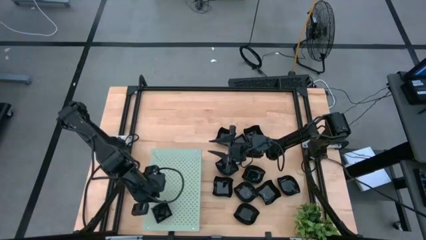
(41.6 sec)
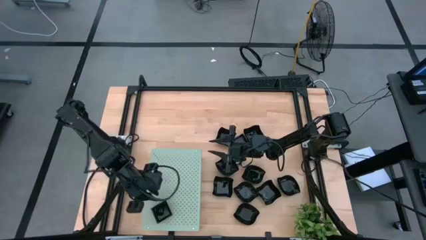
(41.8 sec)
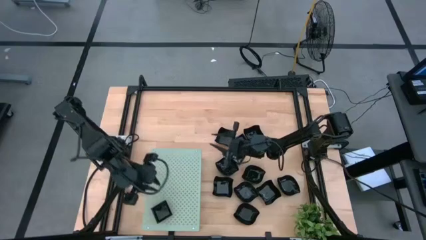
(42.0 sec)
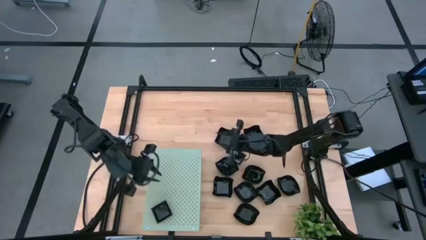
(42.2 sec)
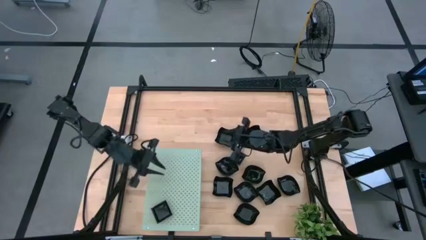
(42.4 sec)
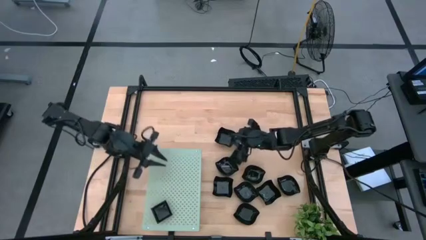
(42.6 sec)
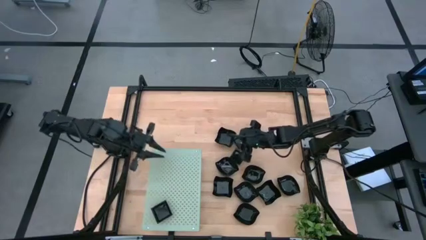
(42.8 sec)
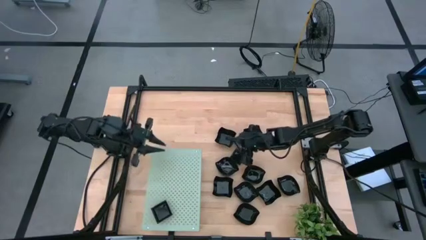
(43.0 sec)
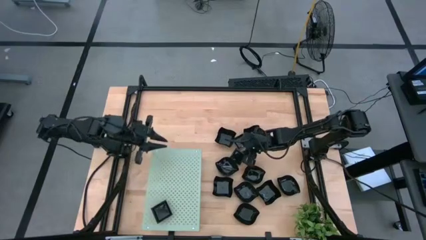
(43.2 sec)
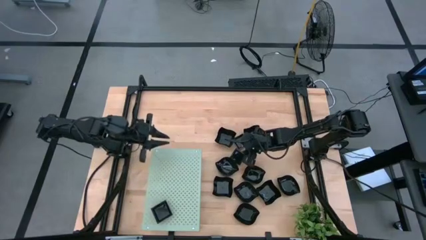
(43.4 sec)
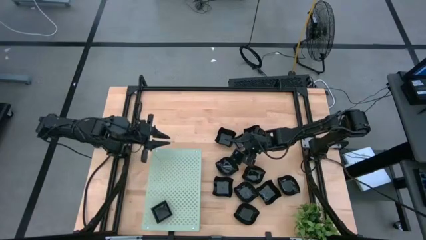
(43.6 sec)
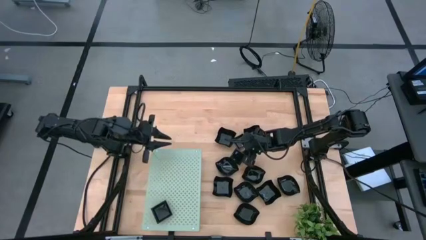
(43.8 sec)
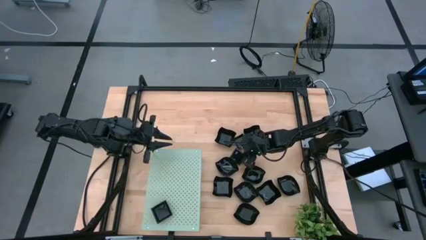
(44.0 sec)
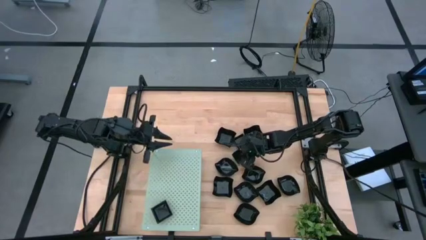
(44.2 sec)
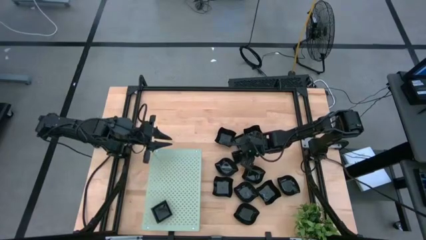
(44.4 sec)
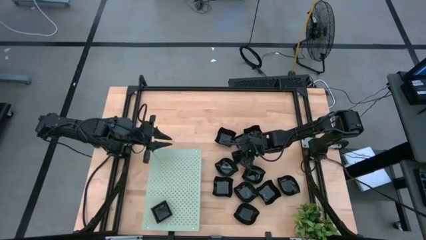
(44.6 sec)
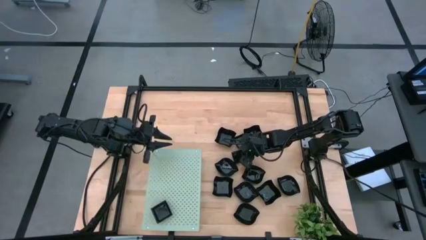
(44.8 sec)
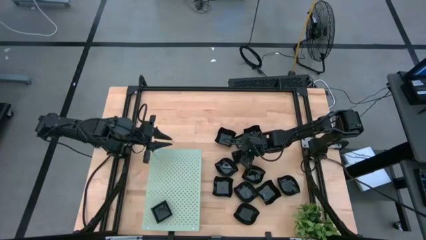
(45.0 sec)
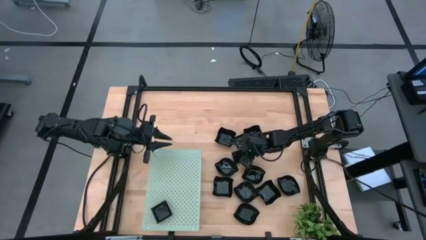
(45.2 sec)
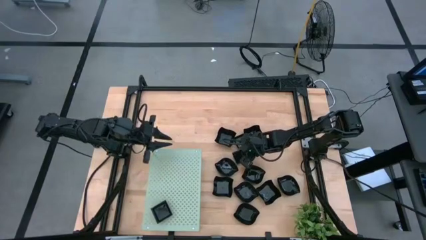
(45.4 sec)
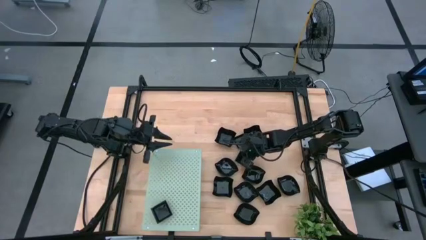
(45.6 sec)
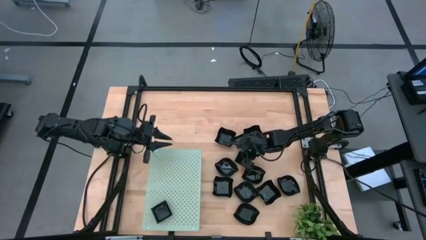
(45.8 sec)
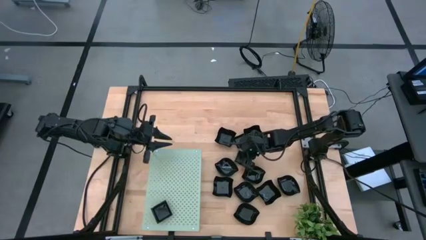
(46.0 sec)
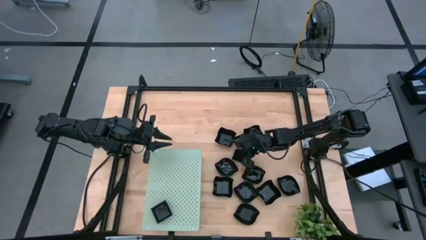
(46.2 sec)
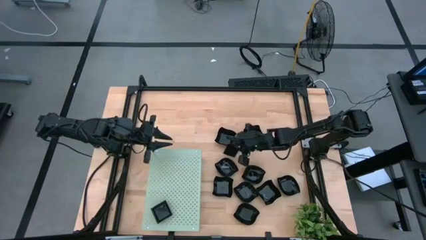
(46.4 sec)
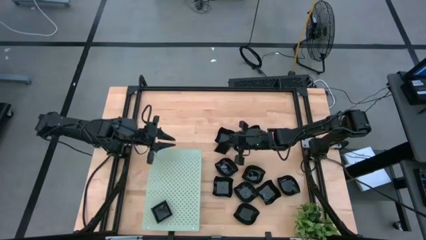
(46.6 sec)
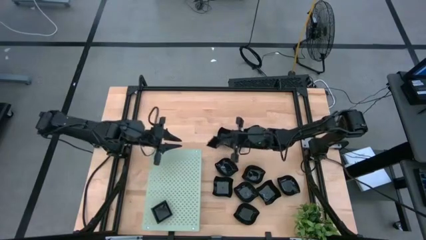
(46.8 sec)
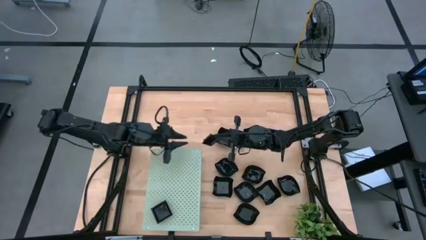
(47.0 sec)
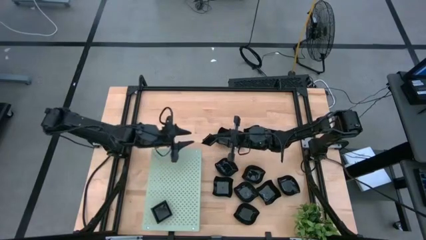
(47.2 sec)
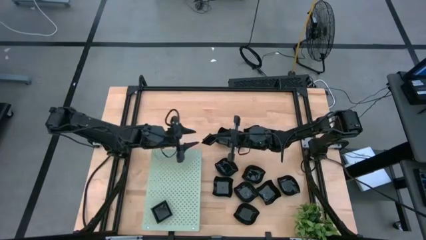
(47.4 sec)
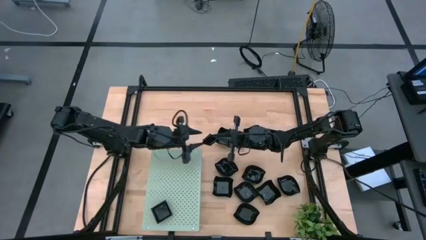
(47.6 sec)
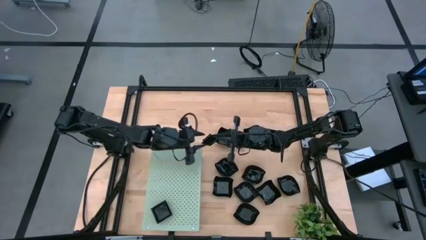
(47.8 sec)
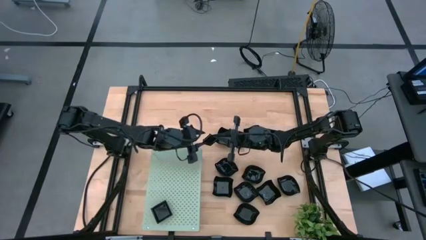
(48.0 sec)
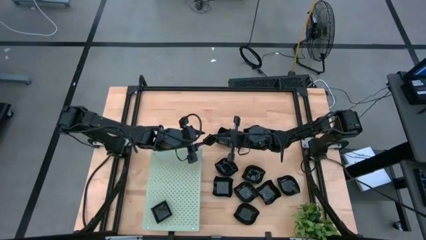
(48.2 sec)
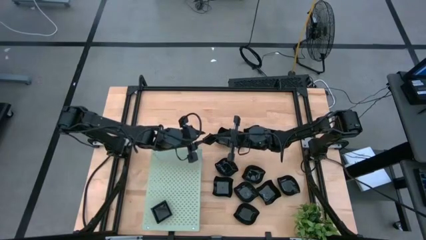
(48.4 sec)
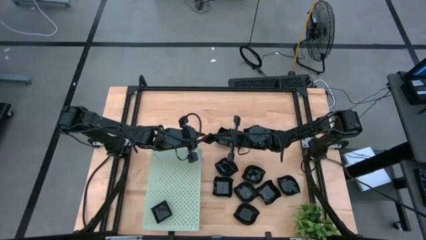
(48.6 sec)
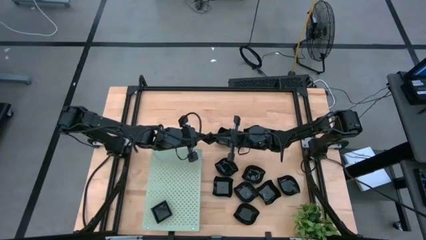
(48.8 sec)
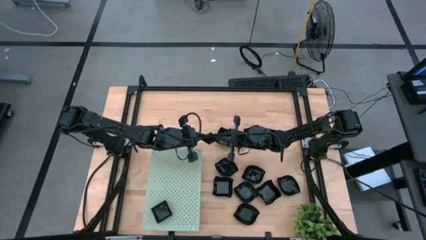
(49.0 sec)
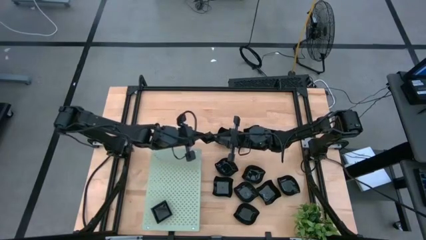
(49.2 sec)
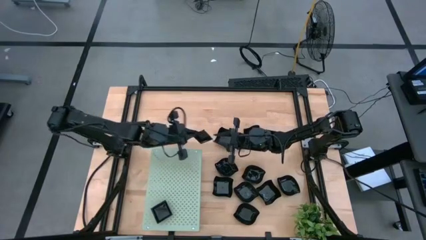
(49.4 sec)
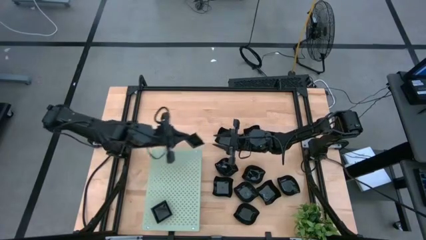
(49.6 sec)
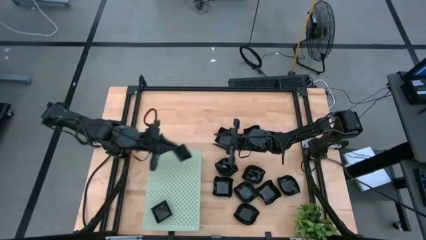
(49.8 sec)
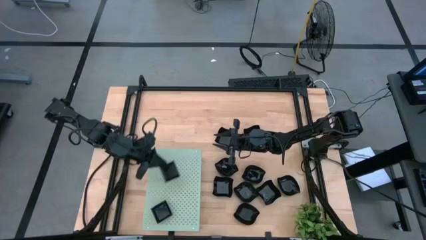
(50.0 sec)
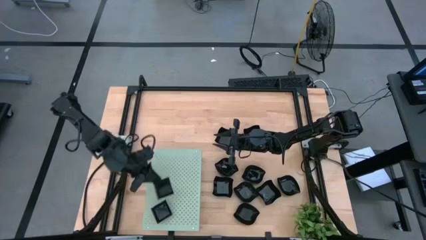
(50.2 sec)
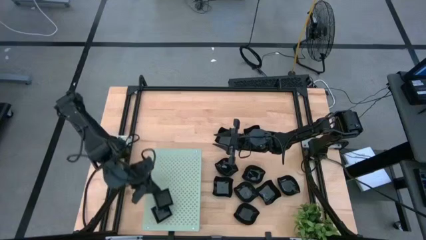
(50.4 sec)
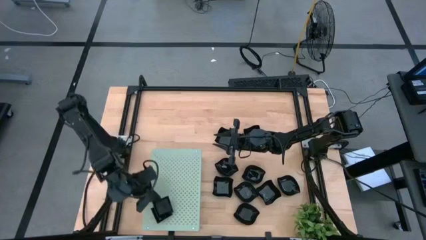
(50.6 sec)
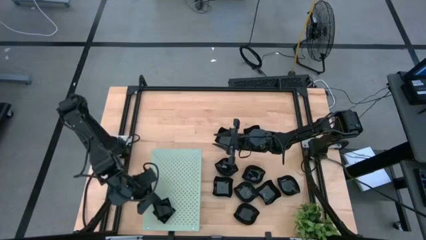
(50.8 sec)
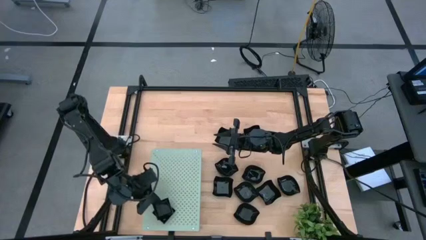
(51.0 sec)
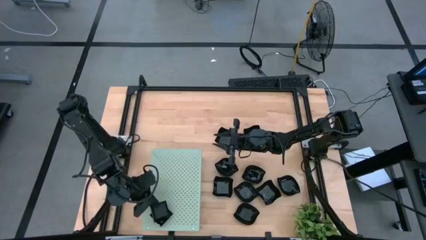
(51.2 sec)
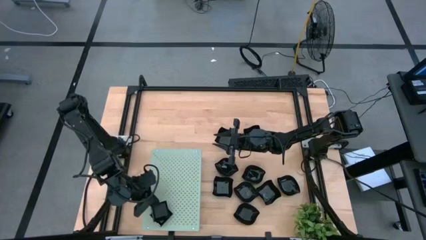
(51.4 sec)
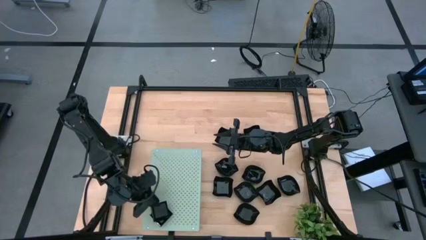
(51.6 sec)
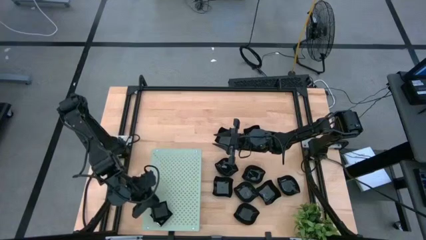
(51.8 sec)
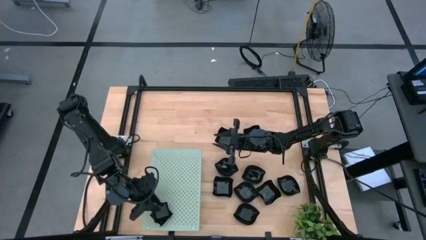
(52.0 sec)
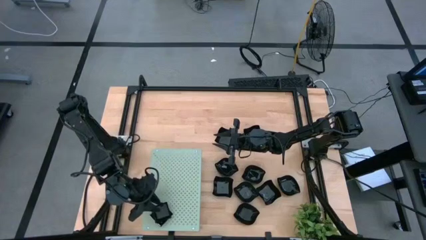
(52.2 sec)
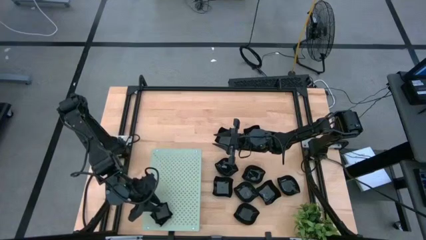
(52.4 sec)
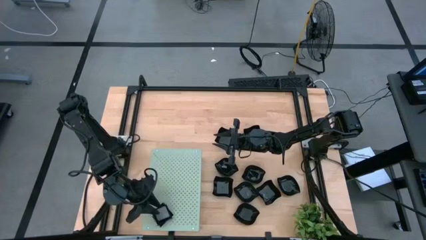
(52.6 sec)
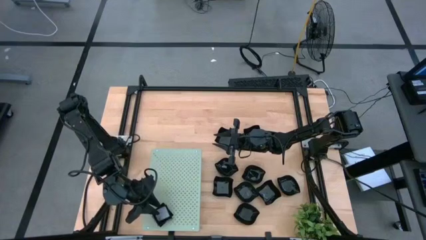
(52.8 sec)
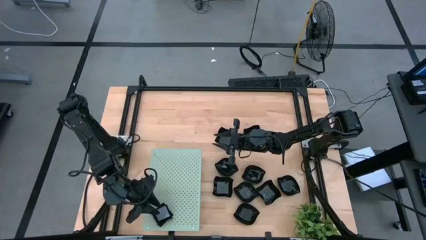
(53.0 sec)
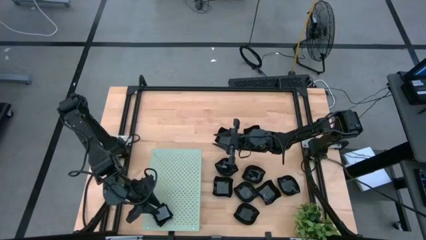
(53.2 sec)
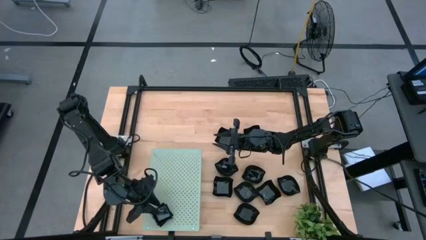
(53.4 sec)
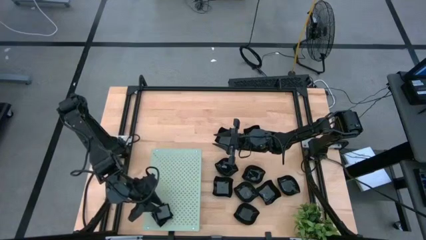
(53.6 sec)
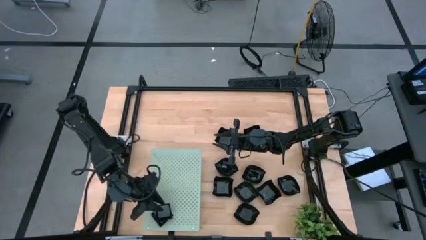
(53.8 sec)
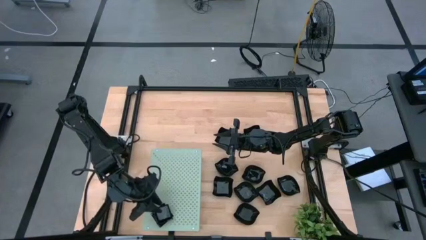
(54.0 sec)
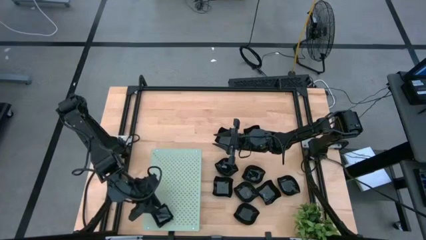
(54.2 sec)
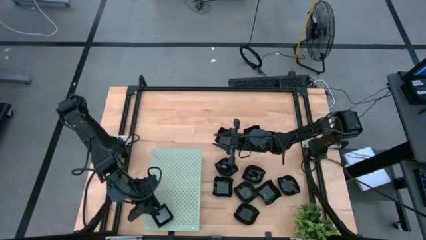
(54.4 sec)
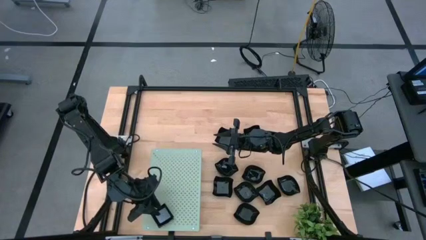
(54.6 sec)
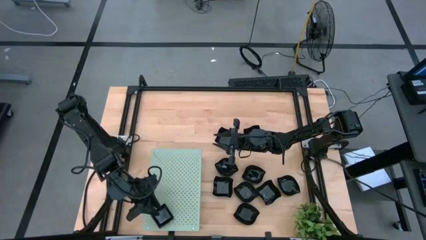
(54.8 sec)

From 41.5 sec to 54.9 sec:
Task: Pick & Place Mini shaped plates
Stack the square plate on top of the other square plates on the shelf
